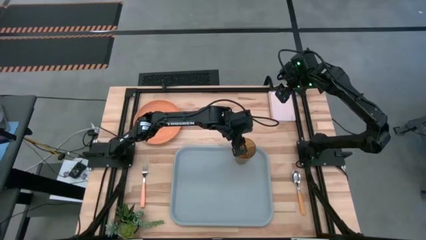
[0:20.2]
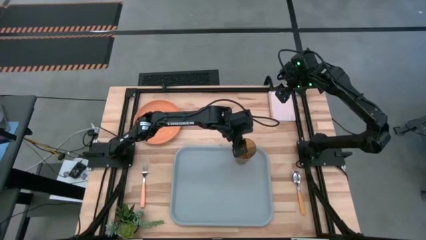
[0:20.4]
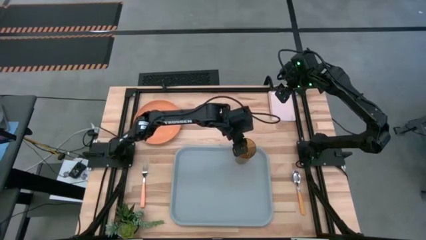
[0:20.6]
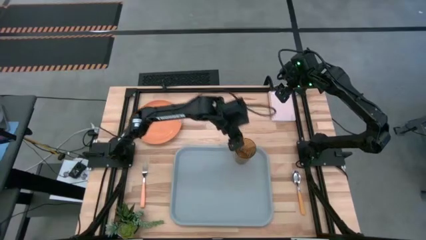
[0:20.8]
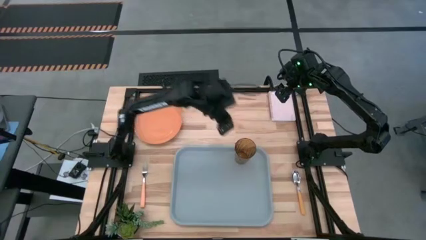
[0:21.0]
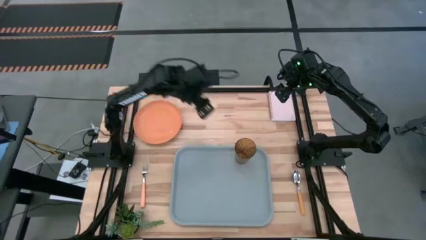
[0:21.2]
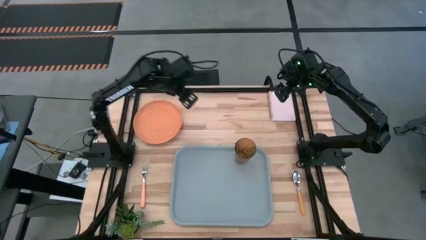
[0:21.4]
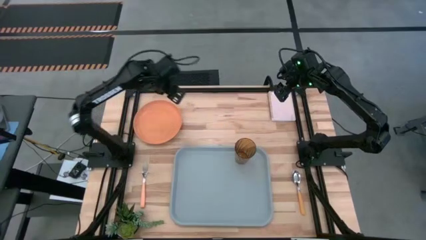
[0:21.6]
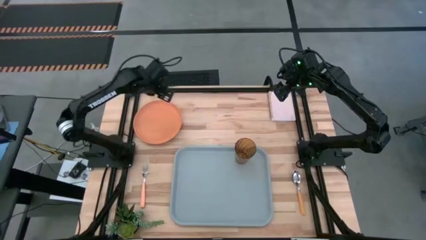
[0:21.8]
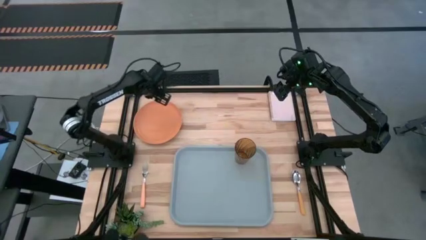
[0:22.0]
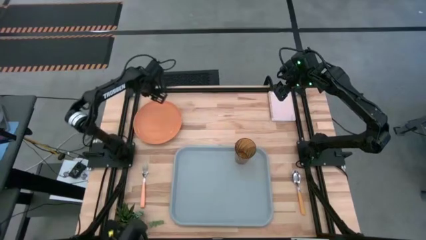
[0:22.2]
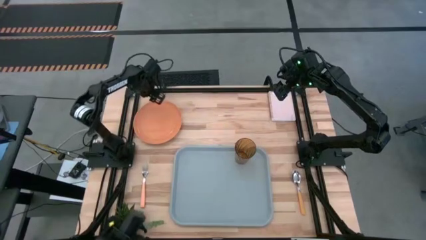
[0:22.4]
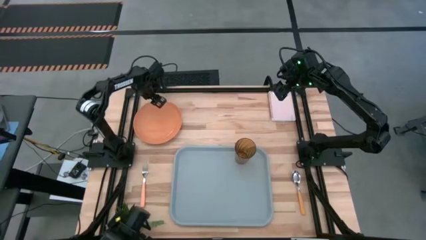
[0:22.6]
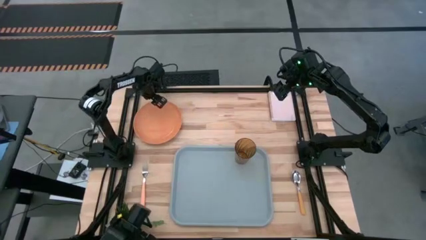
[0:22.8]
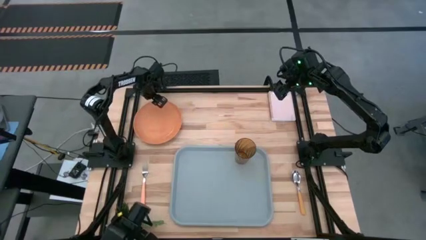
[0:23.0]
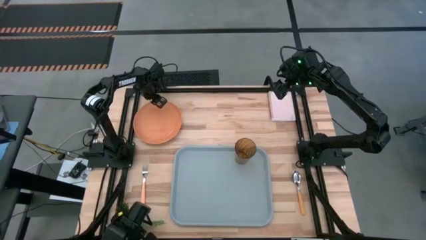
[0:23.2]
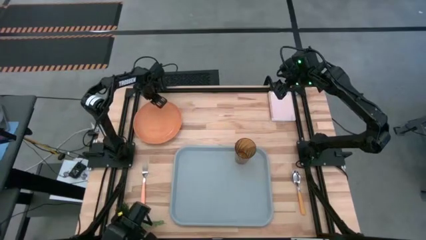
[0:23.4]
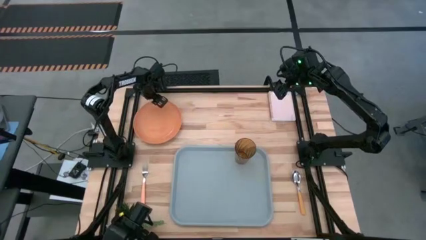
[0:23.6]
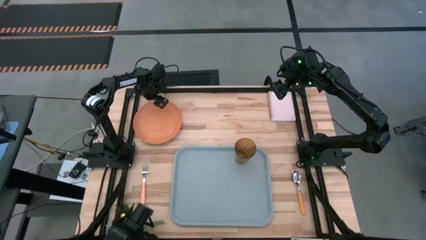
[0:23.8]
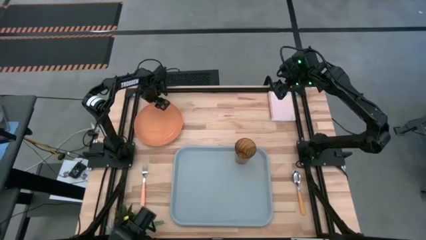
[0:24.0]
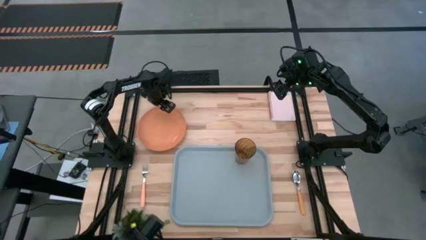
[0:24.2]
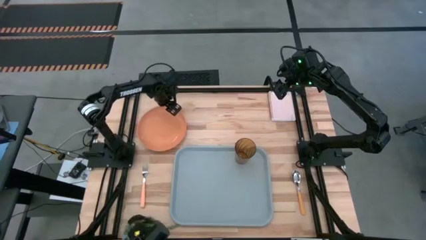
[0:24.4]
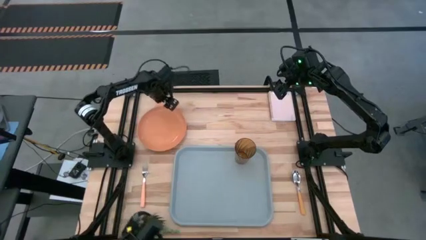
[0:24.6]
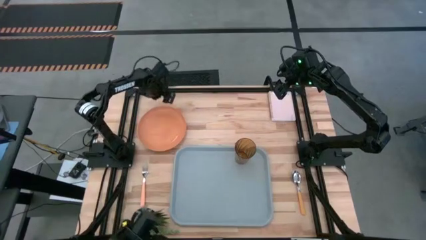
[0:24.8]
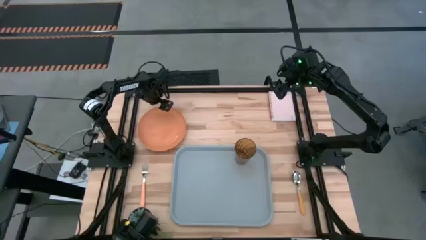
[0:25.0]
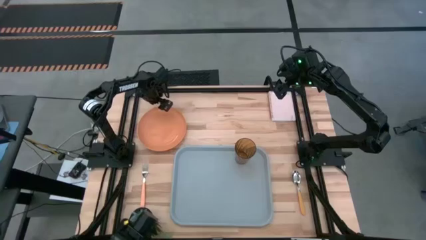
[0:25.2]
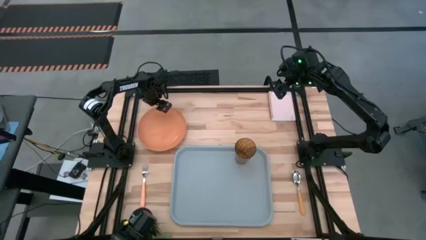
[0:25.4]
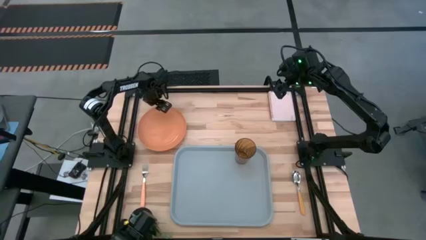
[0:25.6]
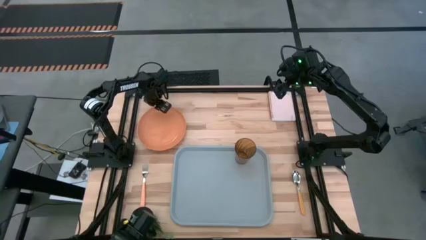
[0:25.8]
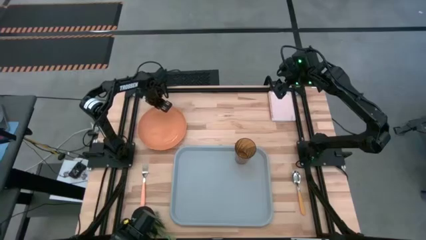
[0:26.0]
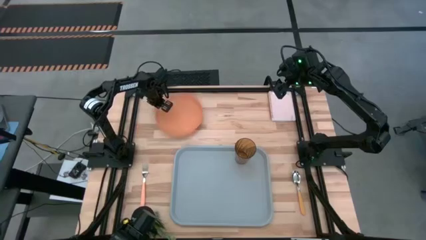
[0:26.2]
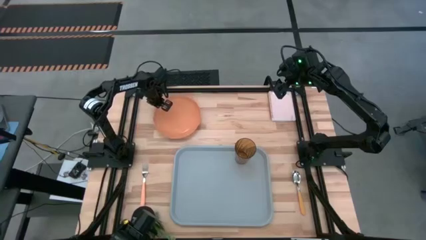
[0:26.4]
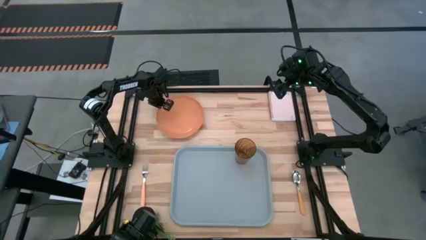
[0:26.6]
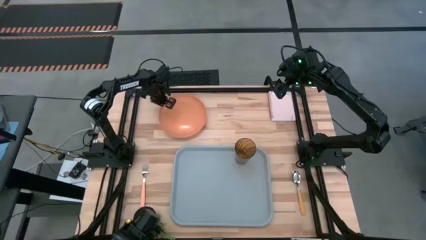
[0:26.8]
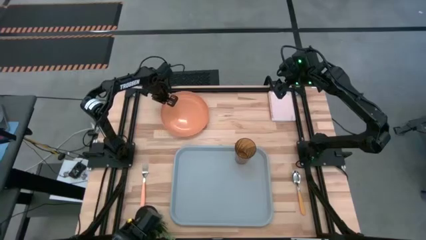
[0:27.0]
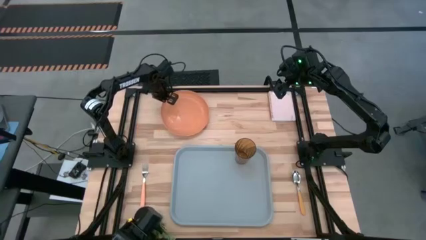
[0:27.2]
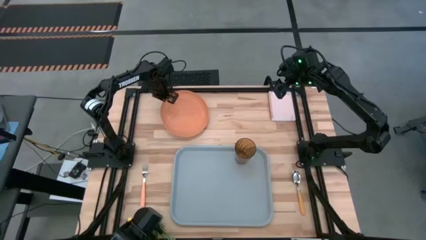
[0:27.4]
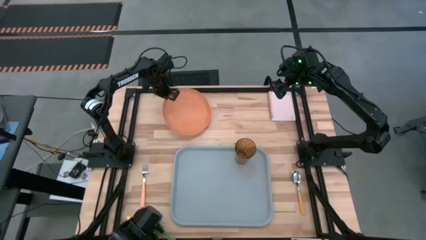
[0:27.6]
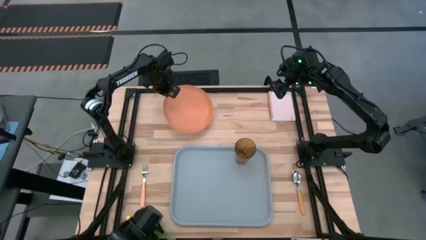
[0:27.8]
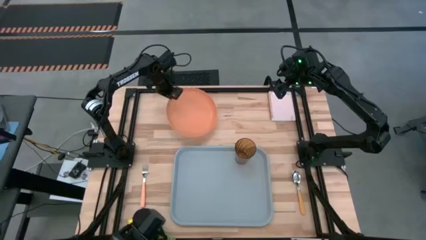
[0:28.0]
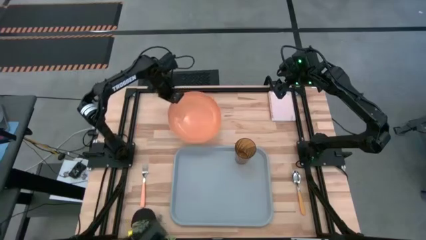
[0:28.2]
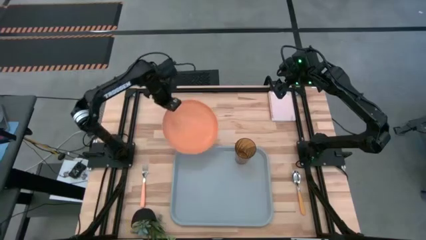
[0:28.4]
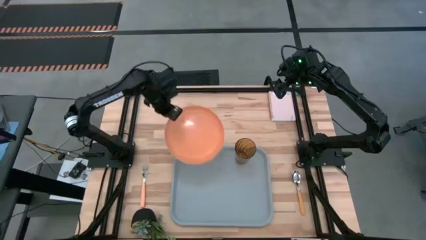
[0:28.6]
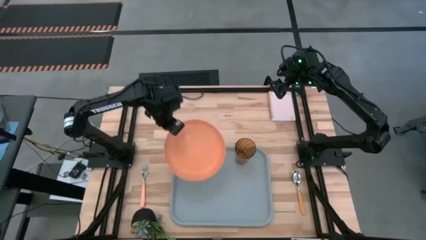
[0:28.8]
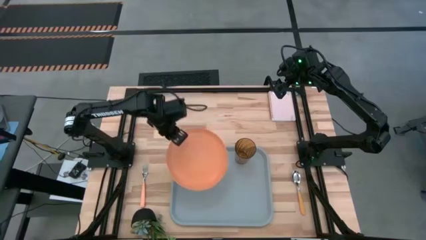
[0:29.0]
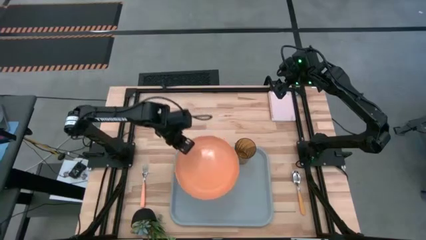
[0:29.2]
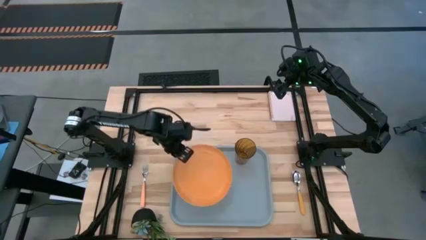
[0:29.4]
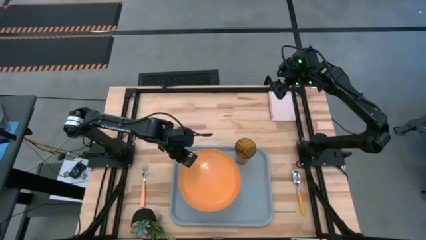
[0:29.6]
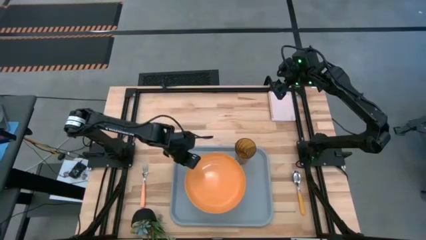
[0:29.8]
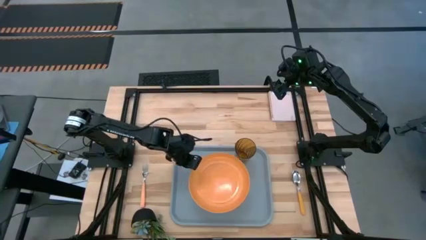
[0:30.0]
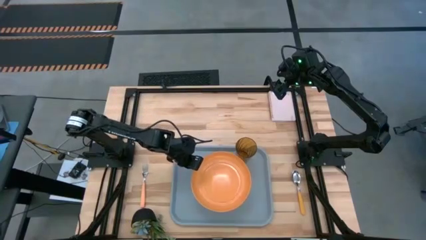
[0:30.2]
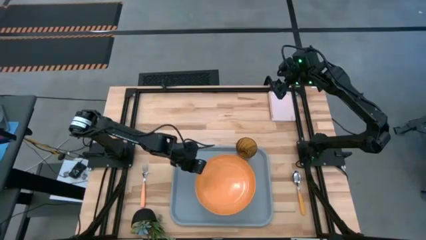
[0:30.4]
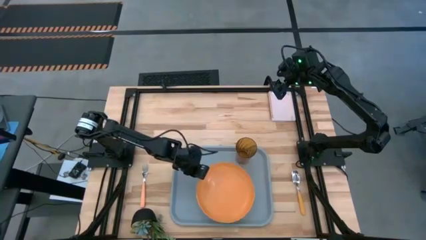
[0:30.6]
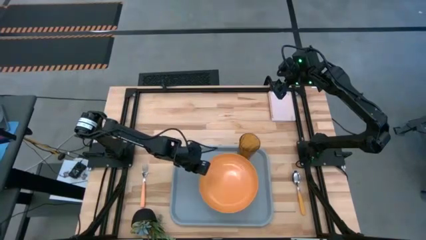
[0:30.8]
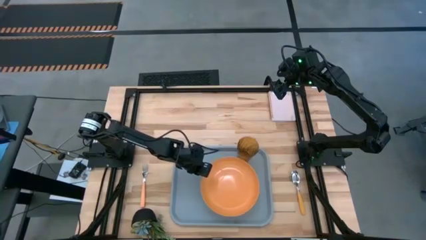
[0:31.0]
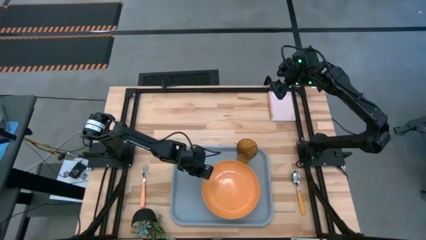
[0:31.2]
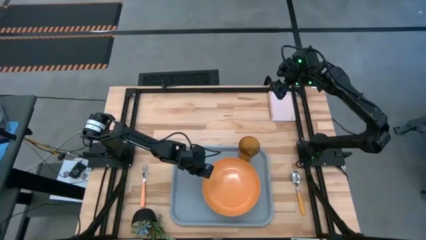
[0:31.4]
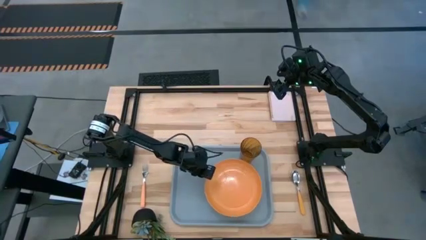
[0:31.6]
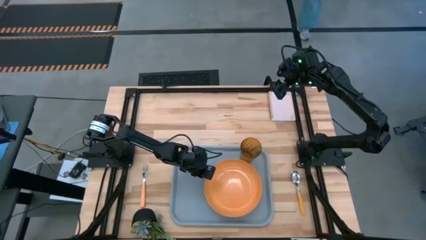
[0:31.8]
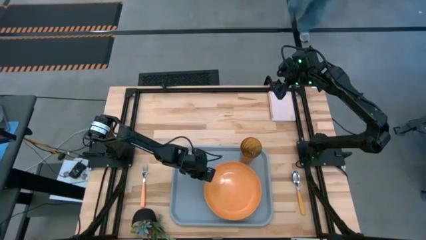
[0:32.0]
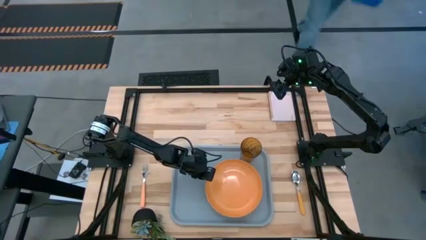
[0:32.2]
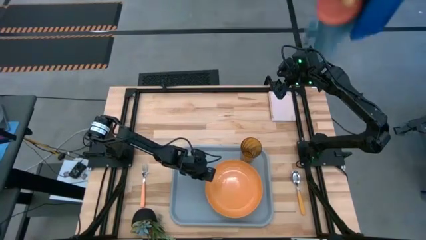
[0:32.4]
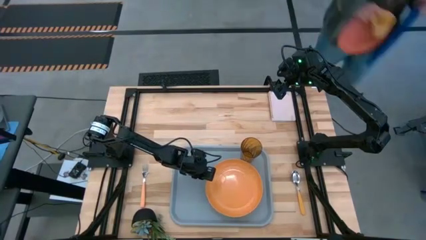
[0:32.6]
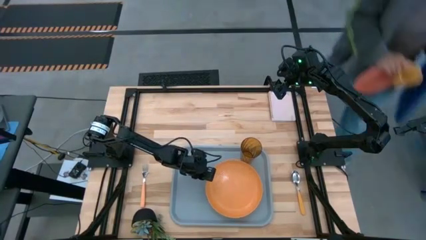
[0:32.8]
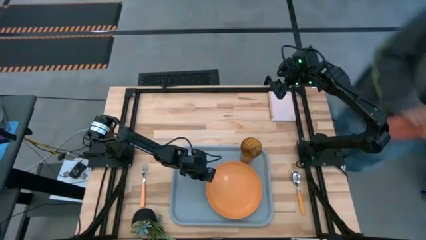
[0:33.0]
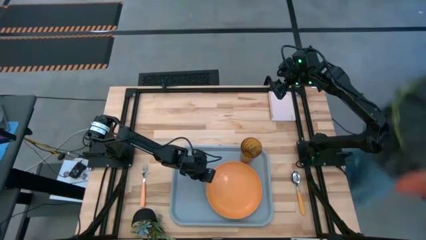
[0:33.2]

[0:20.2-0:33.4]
Task: Pick and place plate/cup/fork/spoon on tray
Put the orange plate on the blue serving tray

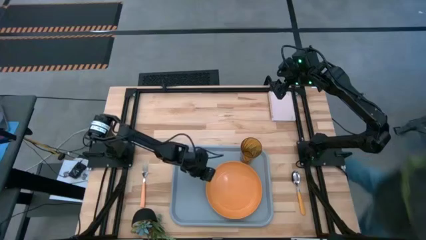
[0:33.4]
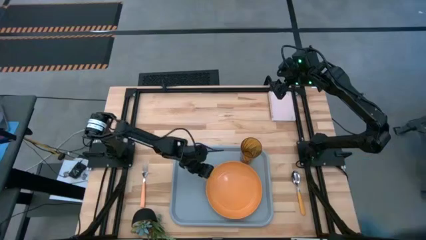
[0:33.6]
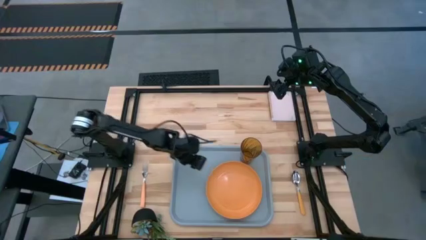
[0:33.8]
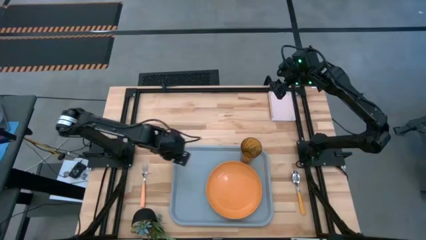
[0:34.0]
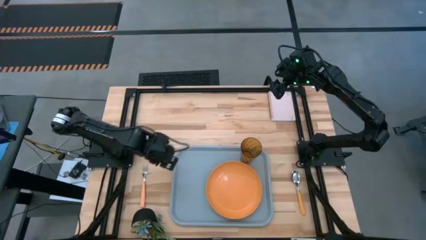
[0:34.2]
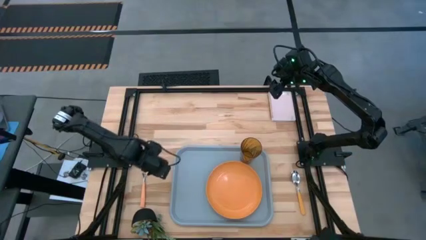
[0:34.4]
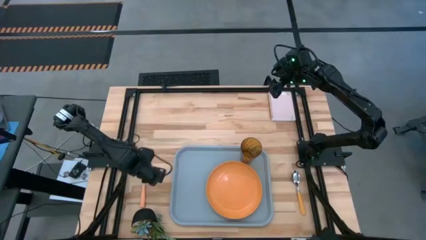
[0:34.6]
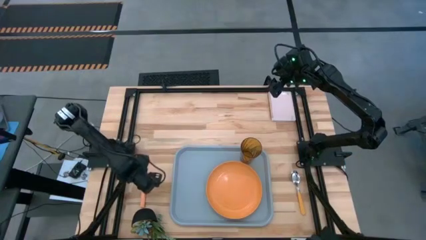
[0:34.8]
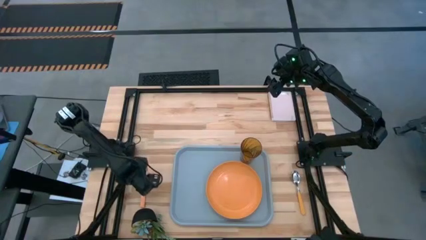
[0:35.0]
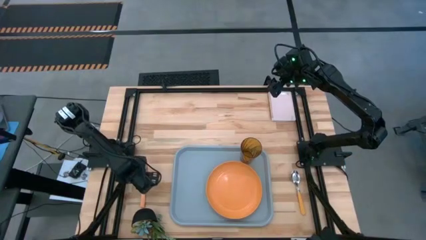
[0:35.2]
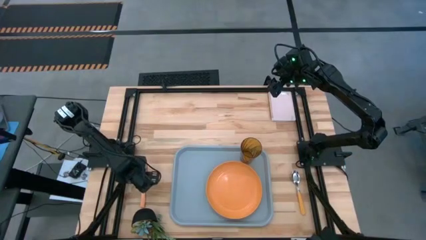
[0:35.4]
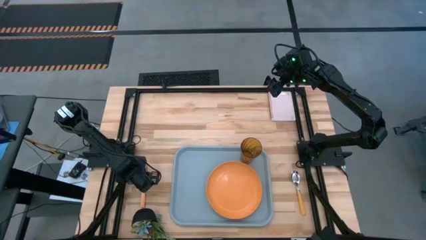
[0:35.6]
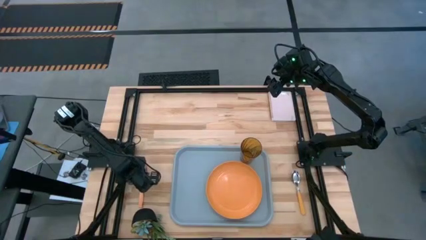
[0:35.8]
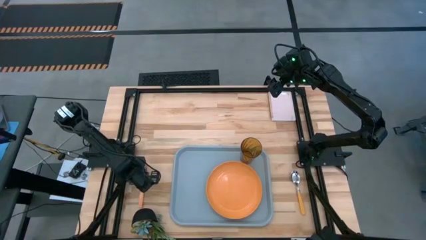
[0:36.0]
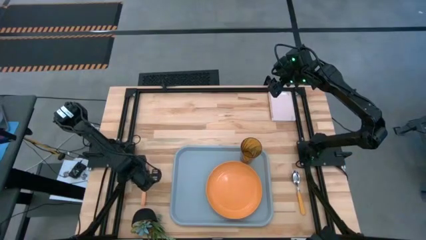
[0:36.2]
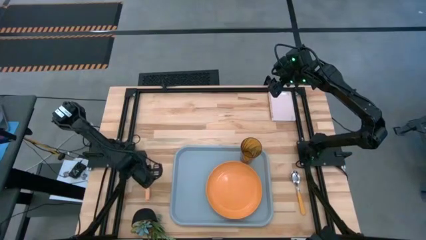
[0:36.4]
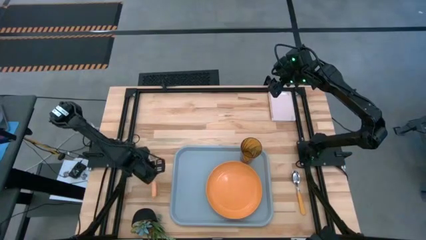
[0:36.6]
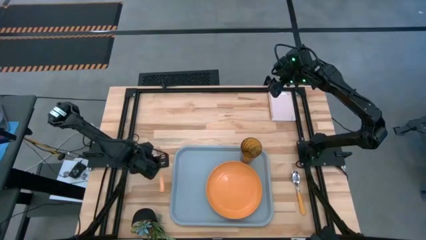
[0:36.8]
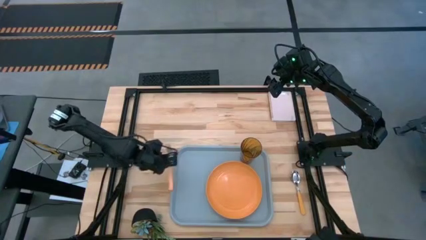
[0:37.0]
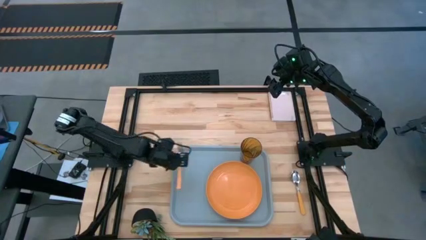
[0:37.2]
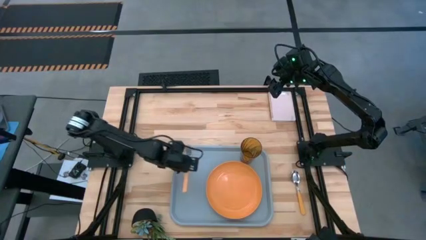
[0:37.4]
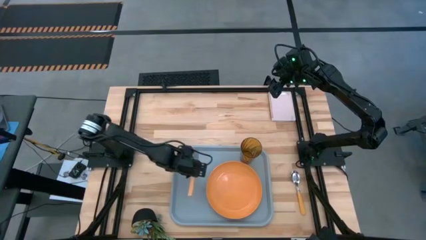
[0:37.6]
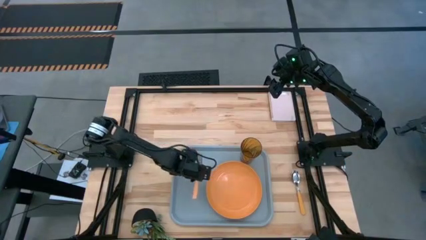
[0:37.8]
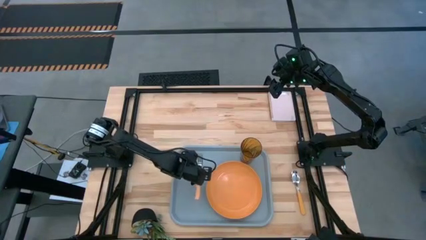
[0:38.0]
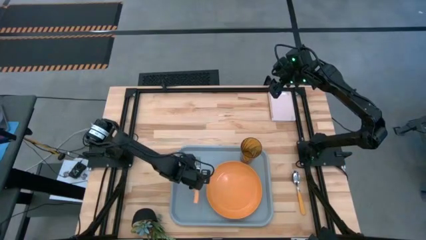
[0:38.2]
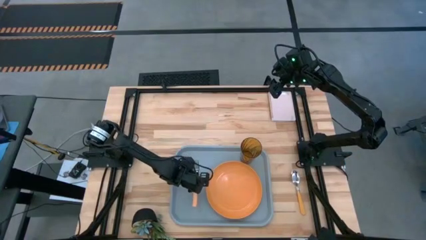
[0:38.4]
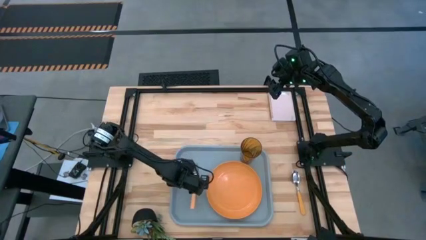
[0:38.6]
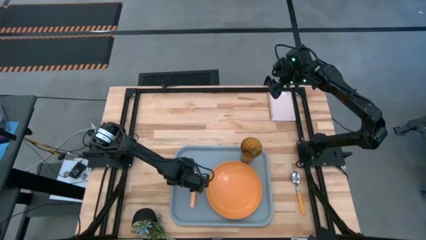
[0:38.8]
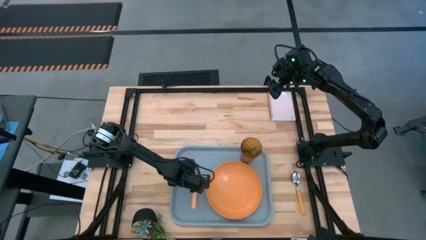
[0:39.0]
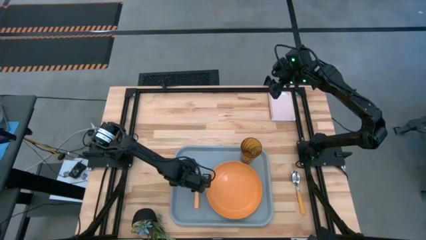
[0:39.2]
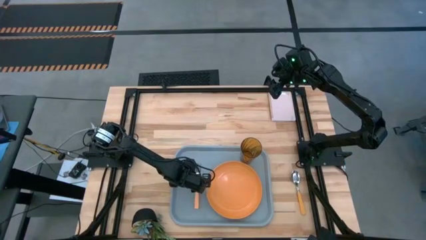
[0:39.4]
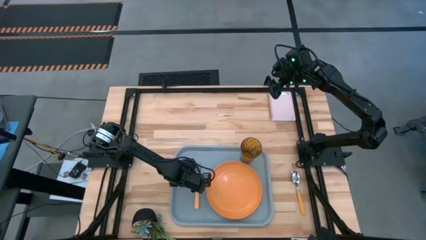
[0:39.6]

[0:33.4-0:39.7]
Put the orange fork to the left side of the orange plate on the blue serving tray
